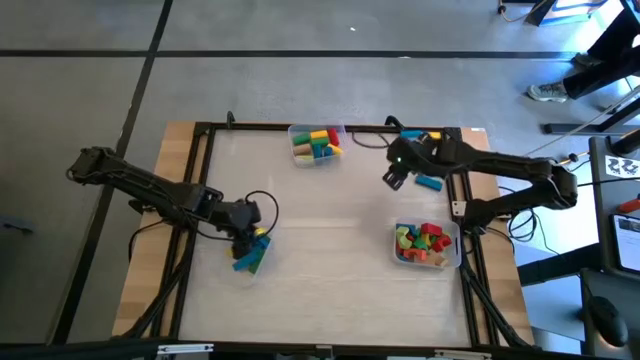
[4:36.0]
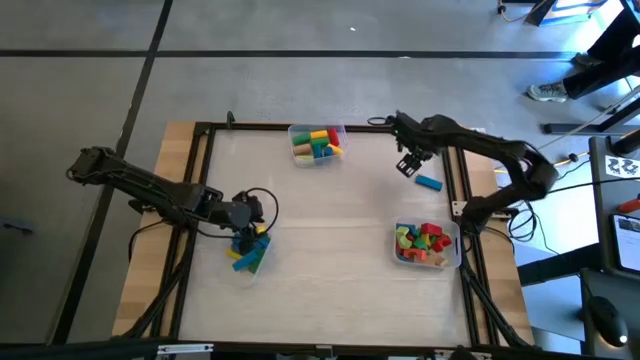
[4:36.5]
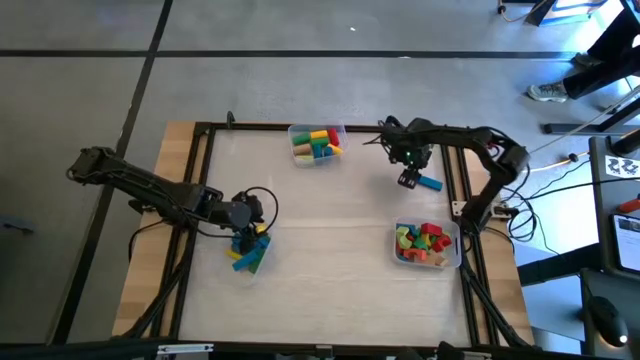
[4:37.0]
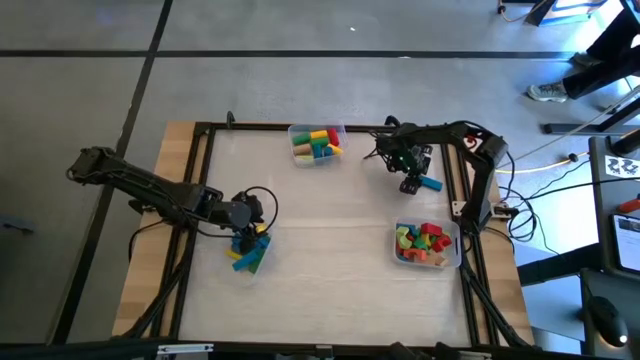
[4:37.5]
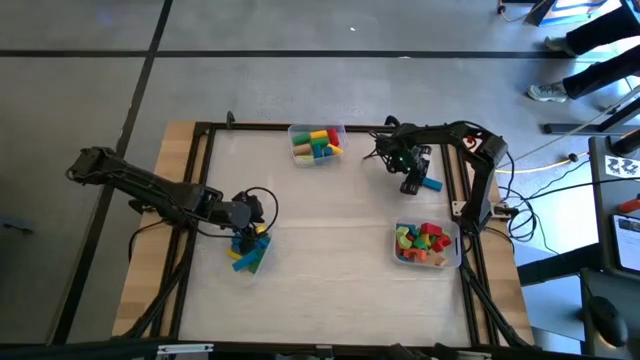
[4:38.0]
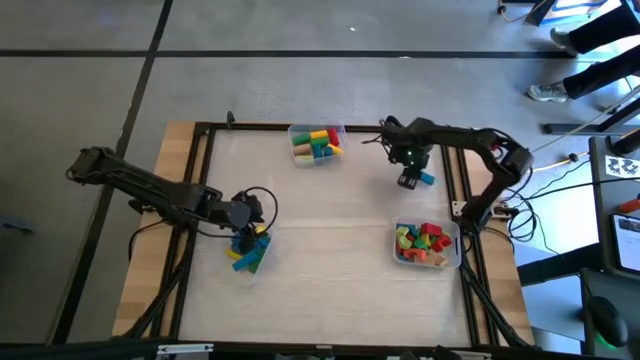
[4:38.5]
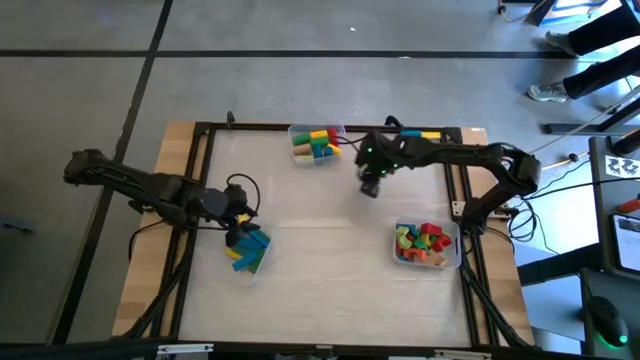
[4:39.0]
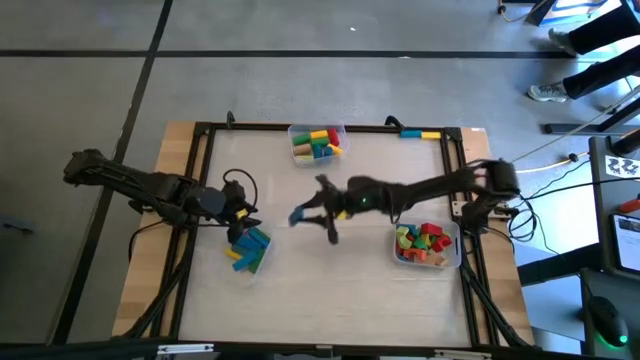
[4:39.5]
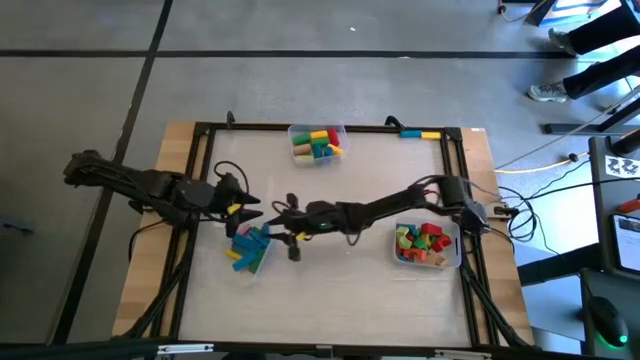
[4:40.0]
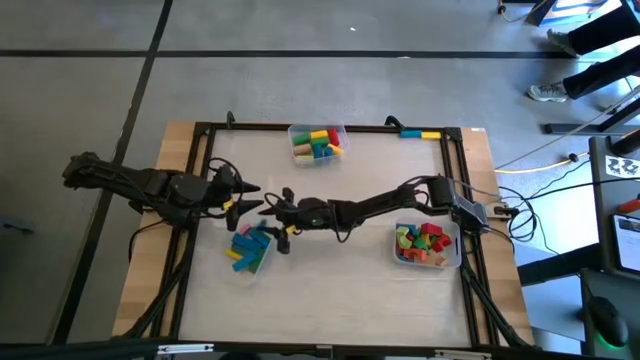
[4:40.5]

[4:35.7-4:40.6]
Task: Sort blocks by size
Put the blue rectangular block into the bottom left transparent bin

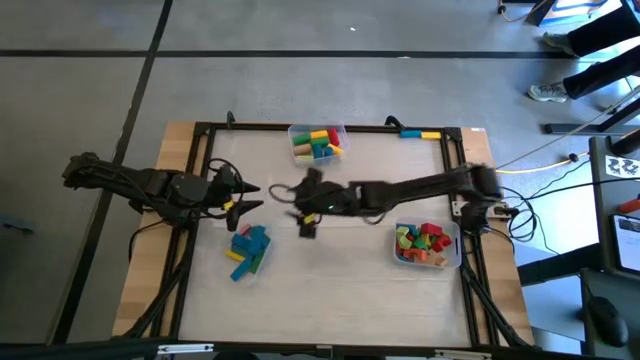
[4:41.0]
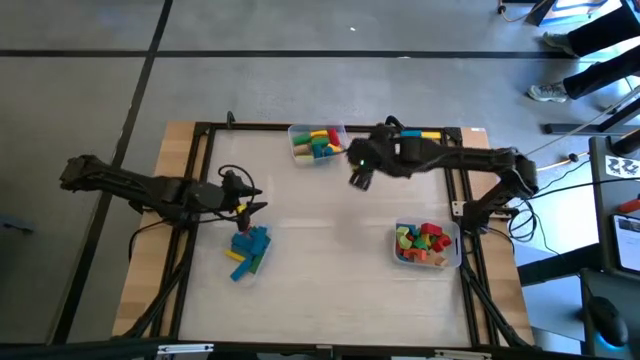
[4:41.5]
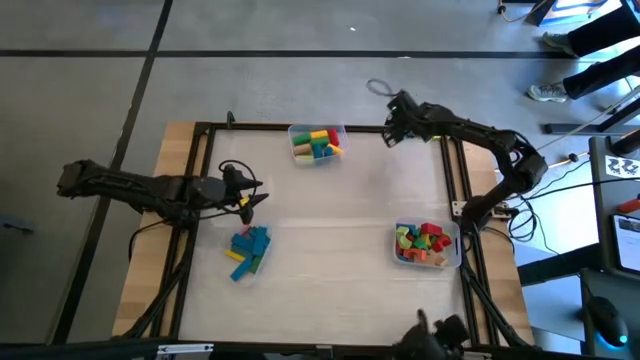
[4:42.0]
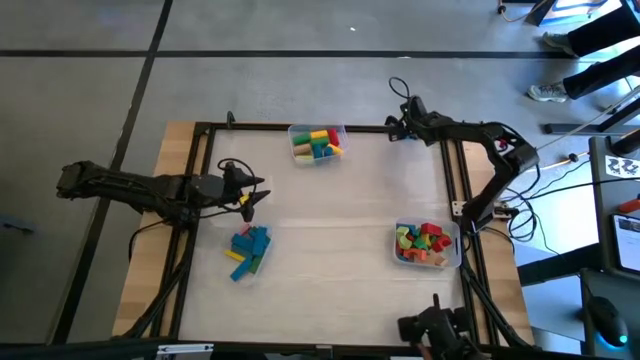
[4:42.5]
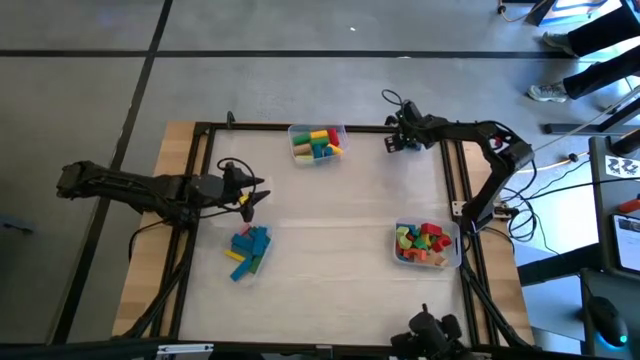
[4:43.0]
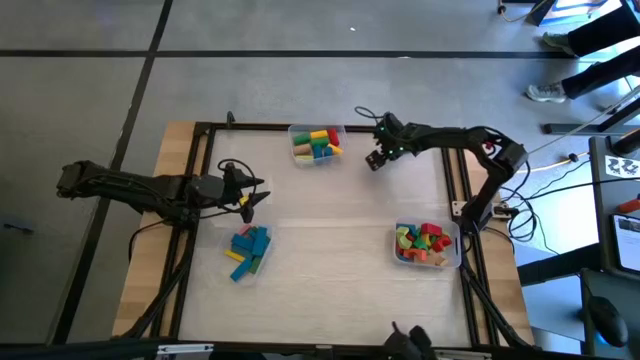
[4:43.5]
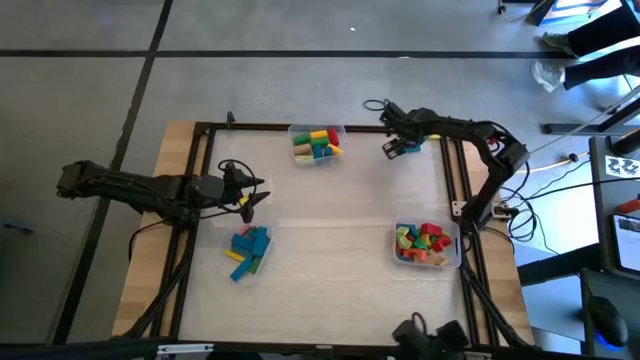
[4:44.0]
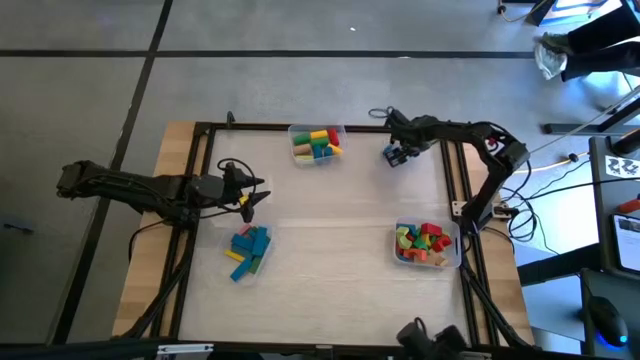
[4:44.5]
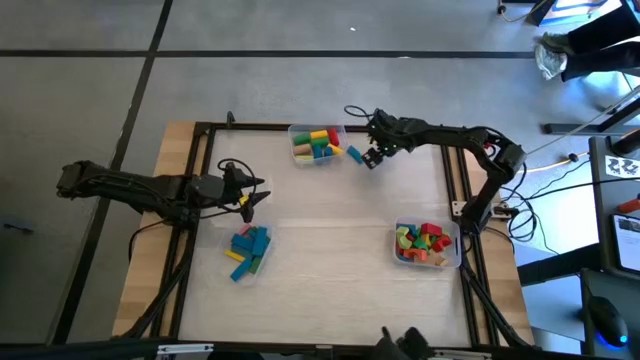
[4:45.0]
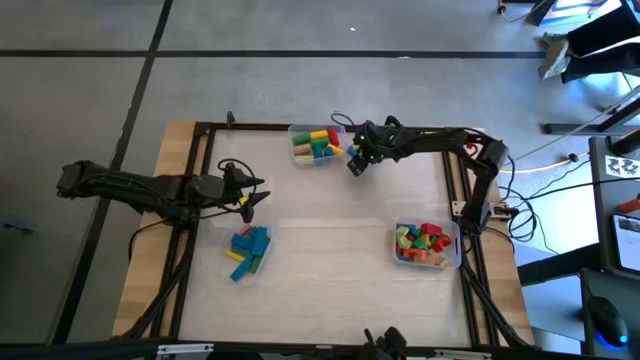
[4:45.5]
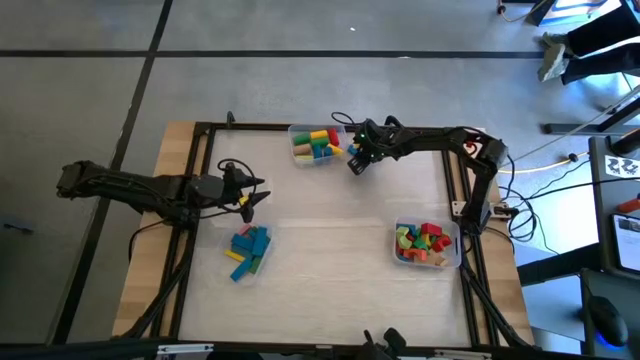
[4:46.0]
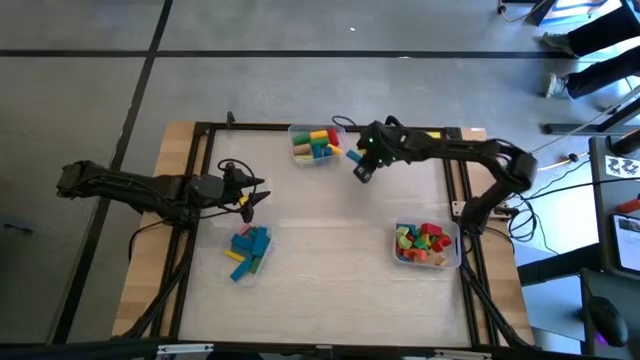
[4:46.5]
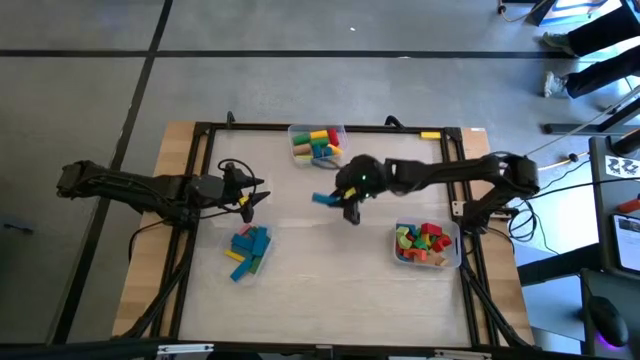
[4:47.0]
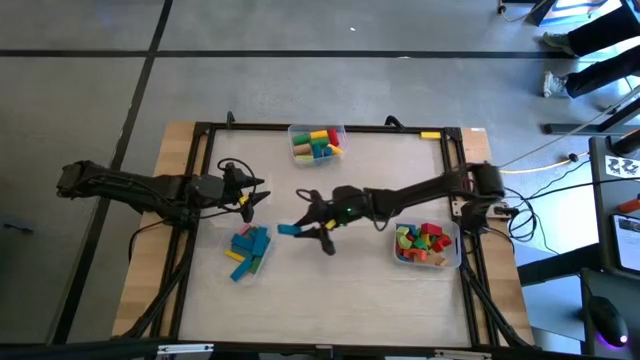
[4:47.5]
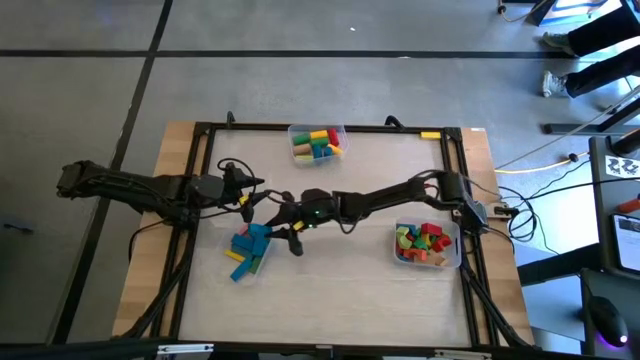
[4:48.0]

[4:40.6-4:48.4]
Put the blue rectangular block into the bottom left transparent bin

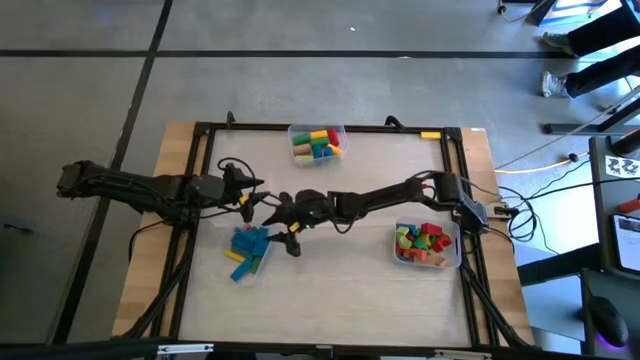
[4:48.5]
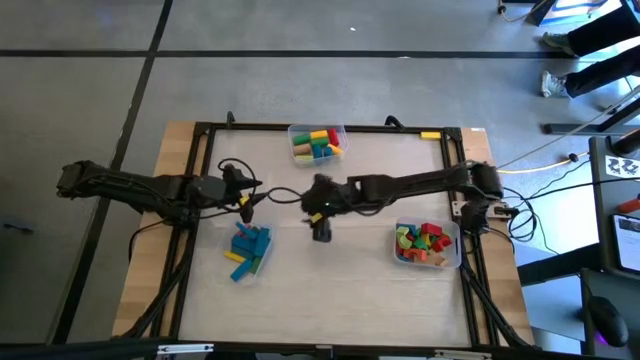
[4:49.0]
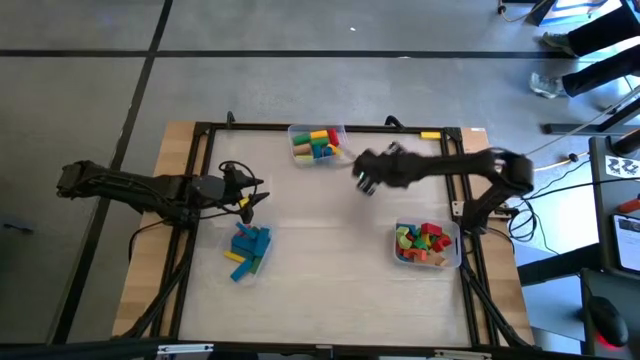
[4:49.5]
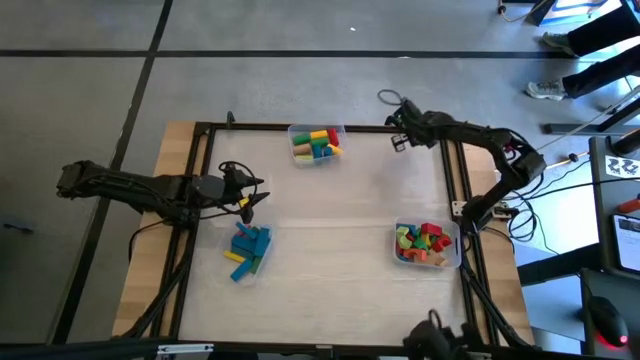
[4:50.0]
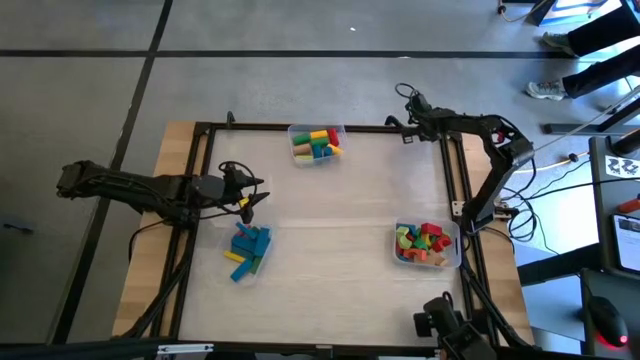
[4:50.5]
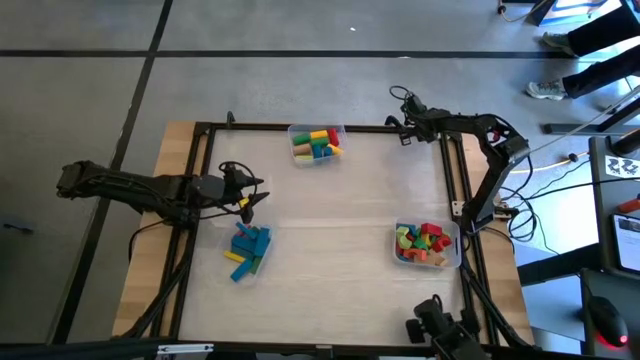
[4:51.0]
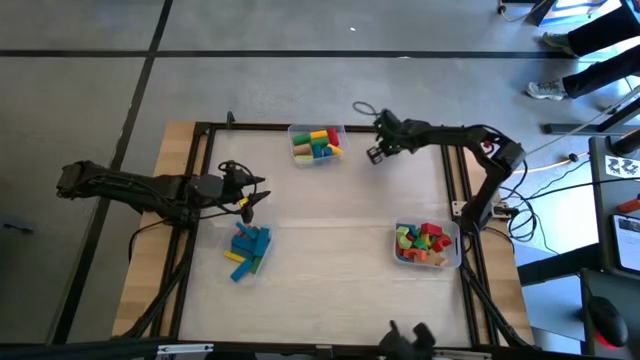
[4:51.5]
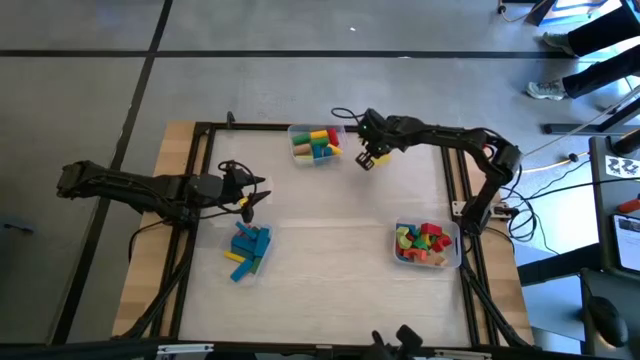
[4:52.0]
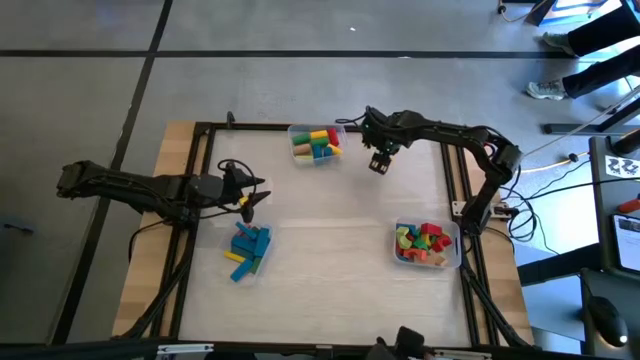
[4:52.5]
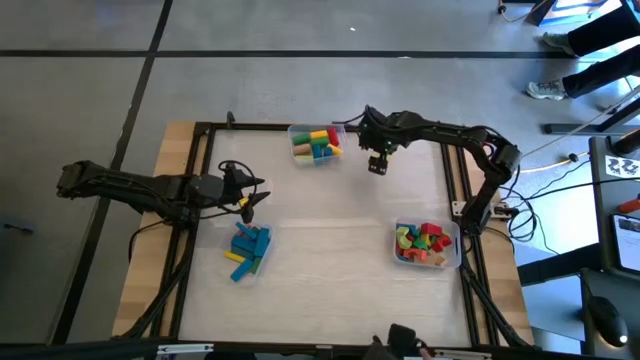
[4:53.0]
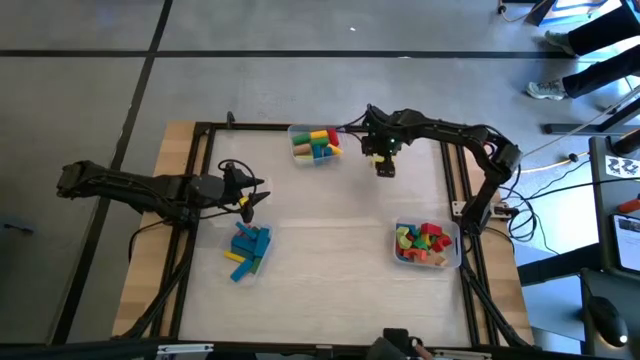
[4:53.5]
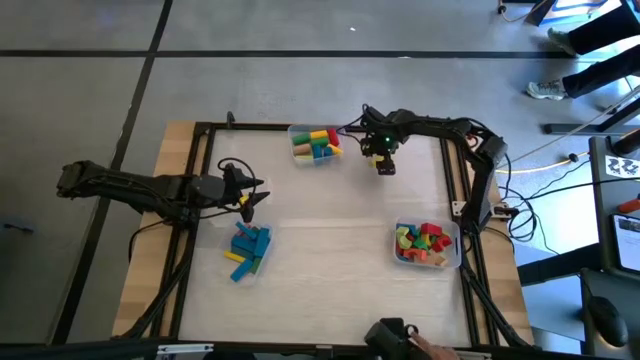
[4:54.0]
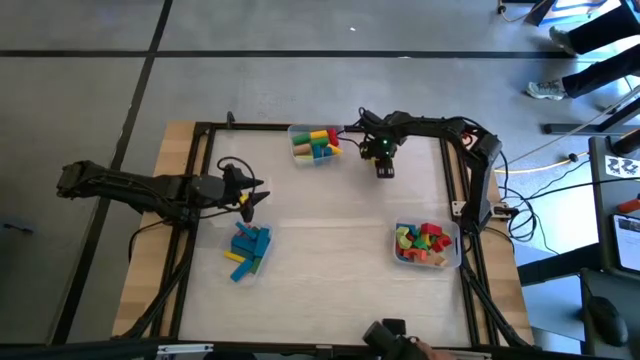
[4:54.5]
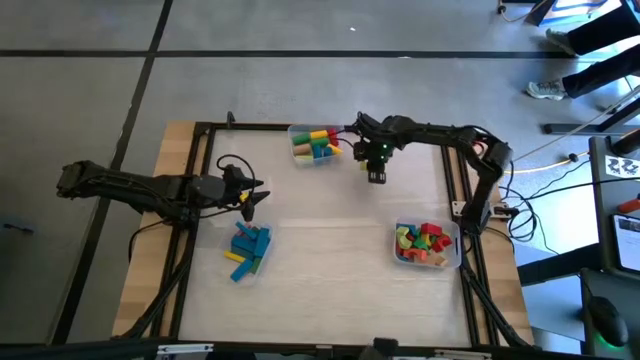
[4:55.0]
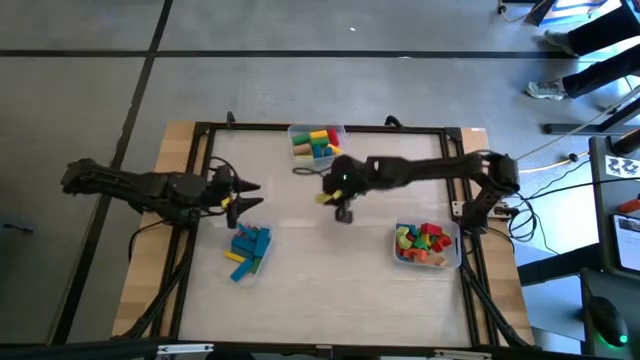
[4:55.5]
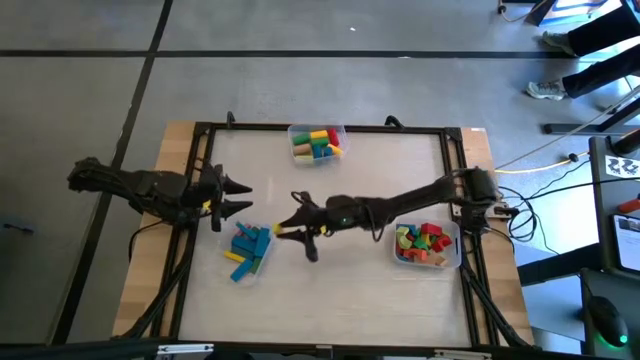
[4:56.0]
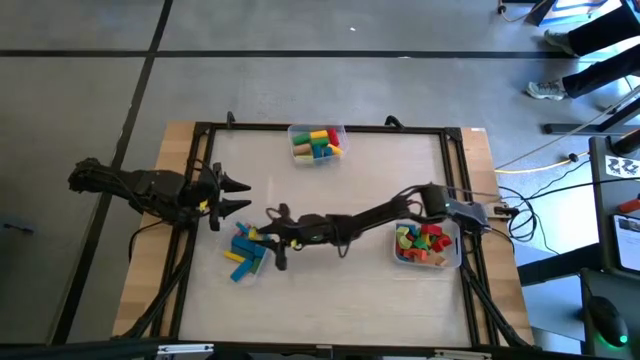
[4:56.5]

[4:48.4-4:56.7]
Put the yellow rectangular block into the bottom left transparent bin
